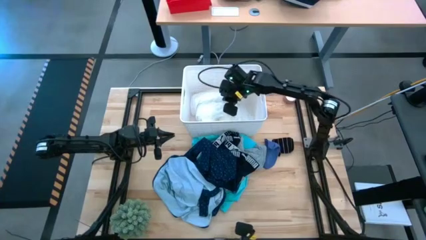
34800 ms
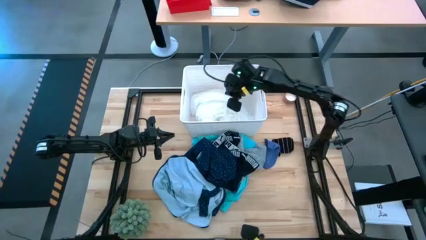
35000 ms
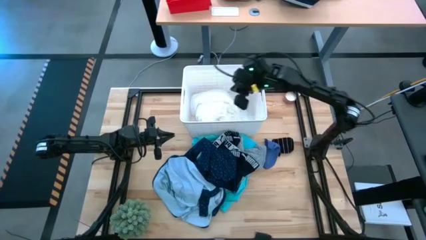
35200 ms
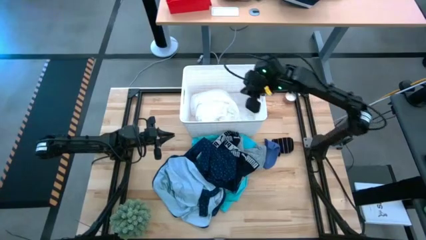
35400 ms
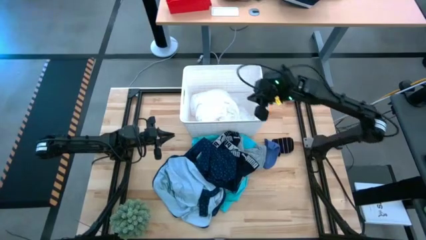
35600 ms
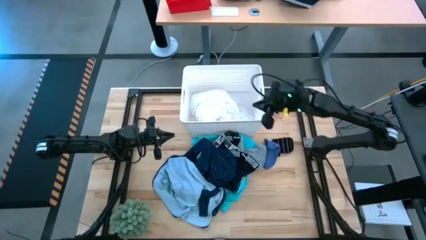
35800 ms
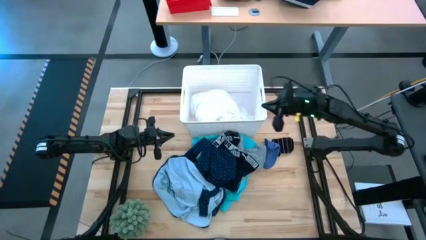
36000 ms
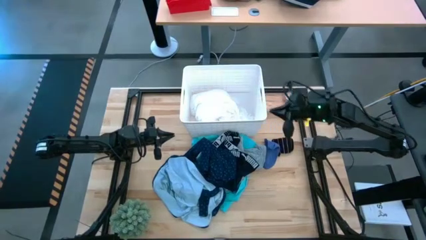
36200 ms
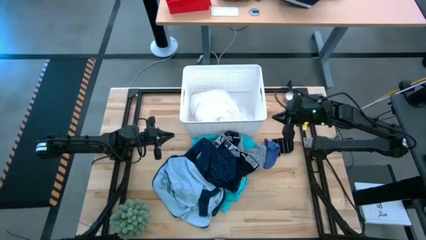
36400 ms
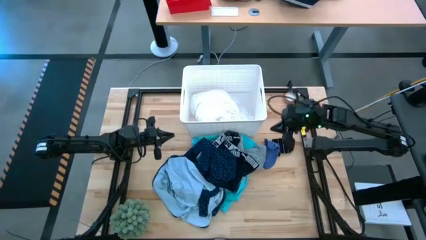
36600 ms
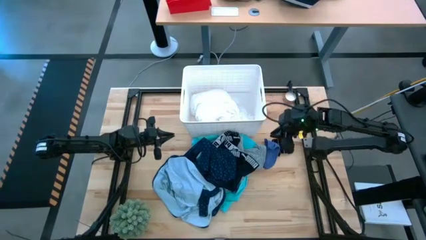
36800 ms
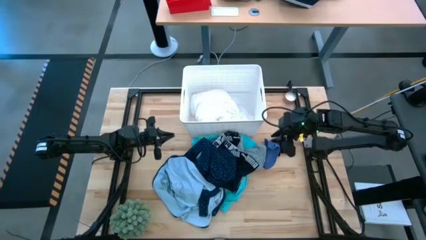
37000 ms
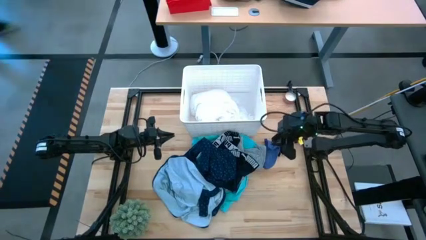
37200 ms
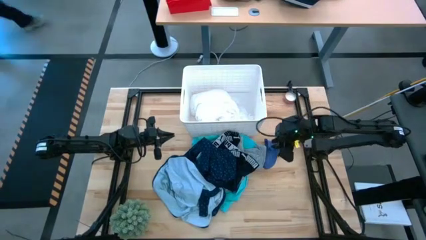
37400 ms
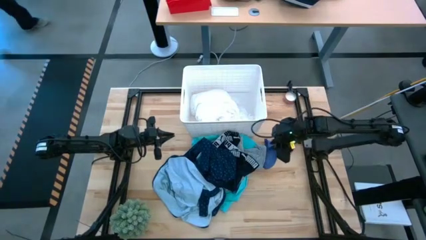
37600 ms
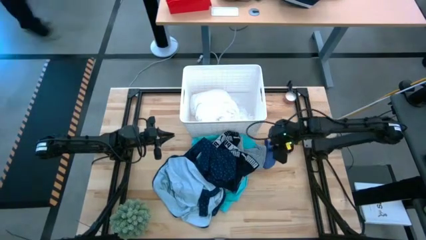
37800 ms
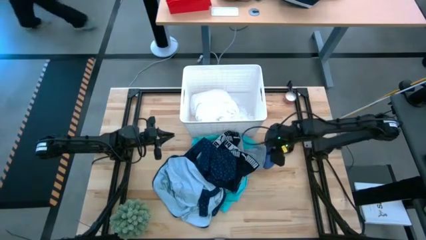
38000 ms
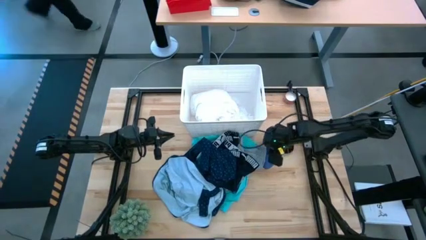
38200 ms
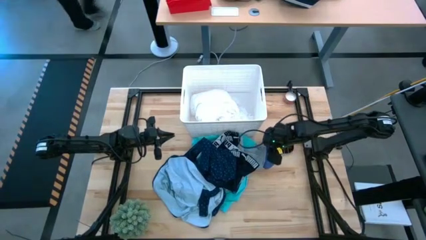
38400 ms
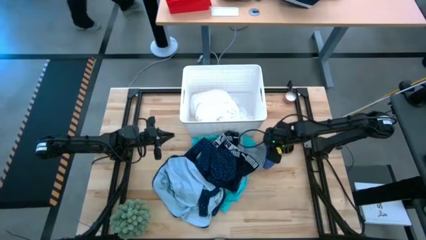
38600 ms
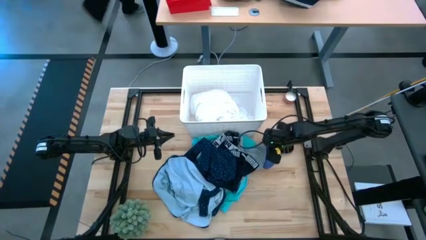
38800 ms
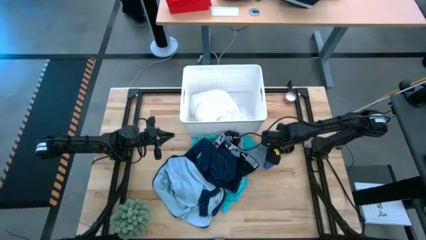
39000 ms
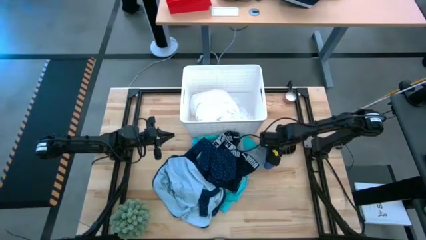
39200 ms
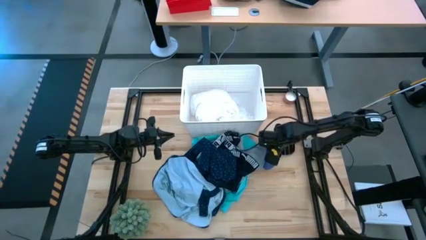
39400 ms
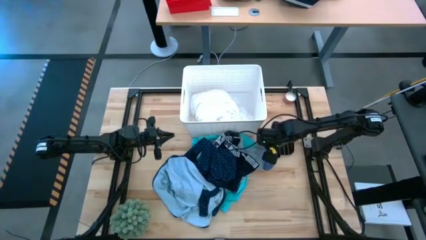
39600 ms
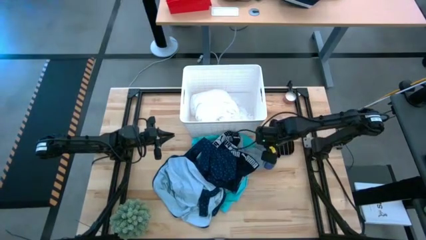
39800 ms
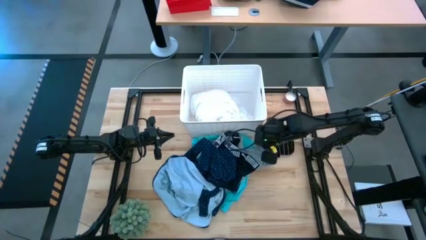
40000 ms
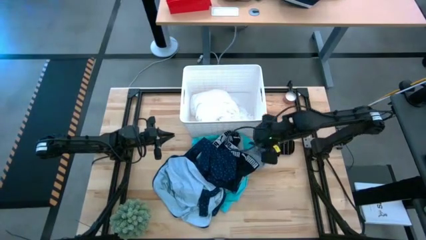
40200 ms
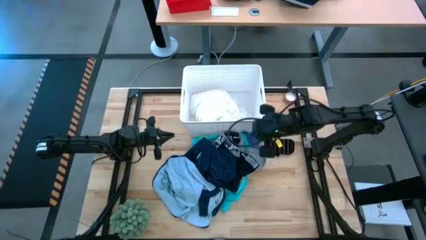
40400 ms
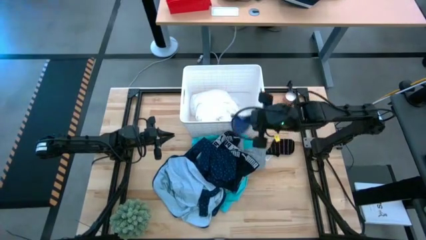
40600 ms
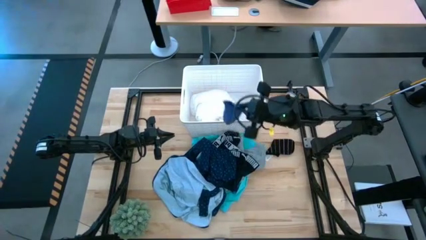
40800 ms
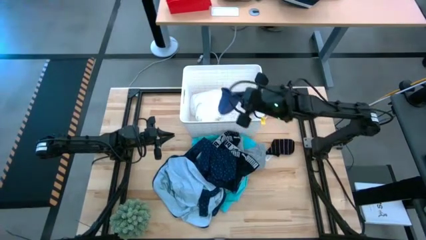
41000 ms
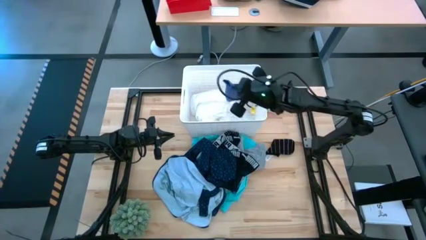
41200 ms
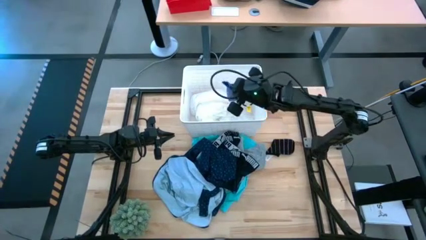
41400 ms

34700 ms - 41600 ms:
Task: Sort clothes
Put the blue socks into the white bin

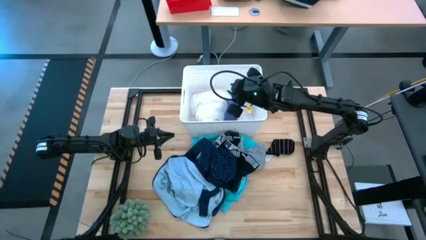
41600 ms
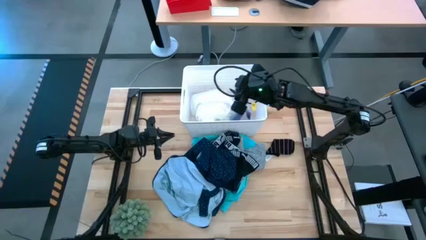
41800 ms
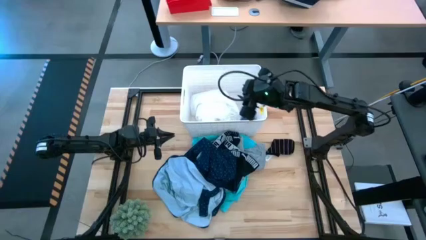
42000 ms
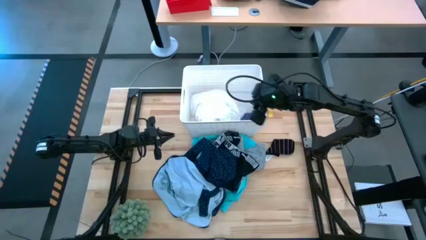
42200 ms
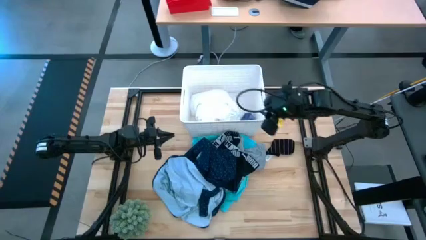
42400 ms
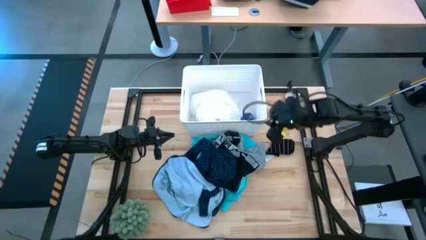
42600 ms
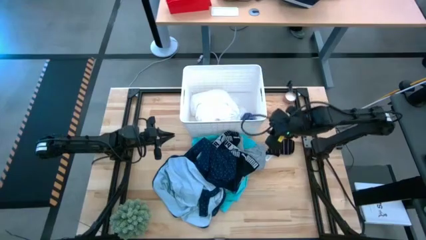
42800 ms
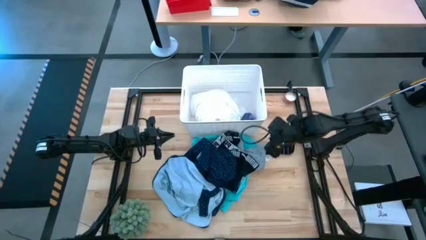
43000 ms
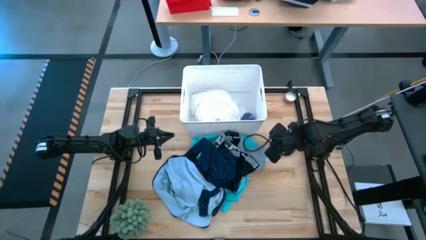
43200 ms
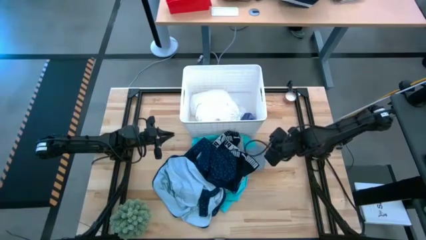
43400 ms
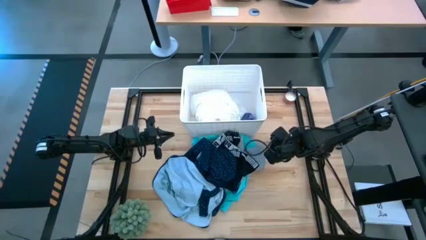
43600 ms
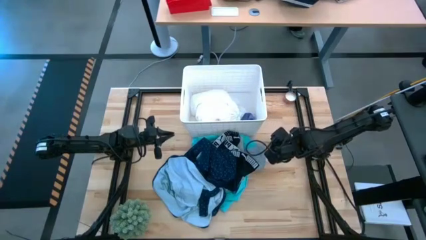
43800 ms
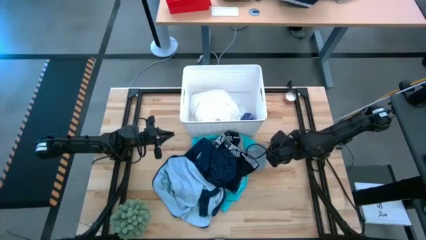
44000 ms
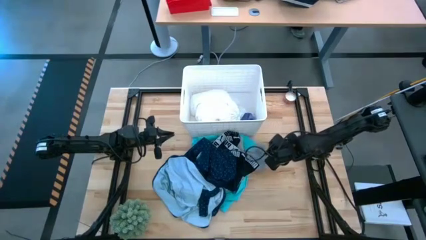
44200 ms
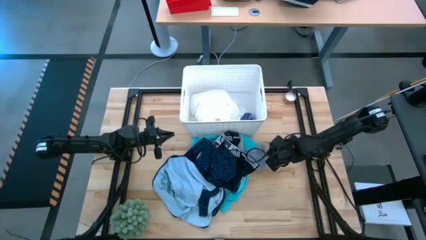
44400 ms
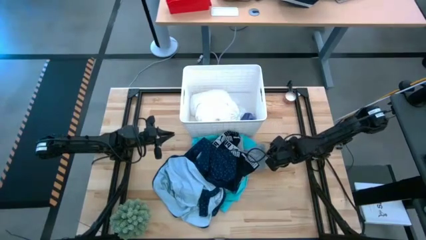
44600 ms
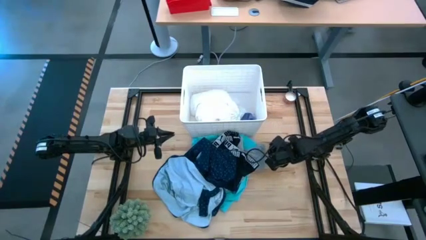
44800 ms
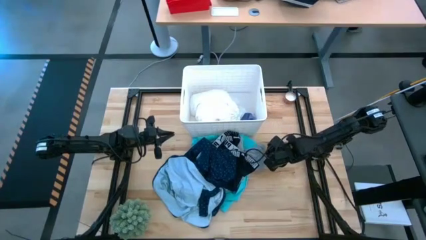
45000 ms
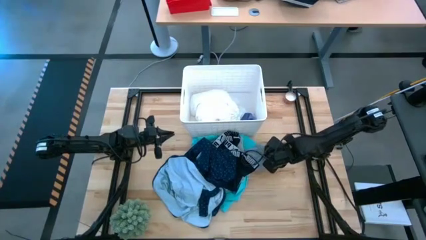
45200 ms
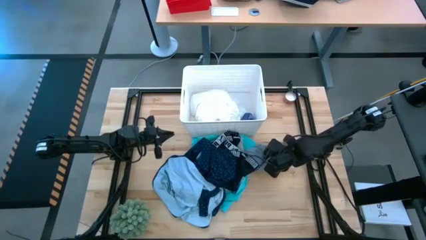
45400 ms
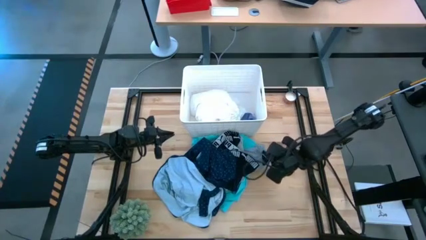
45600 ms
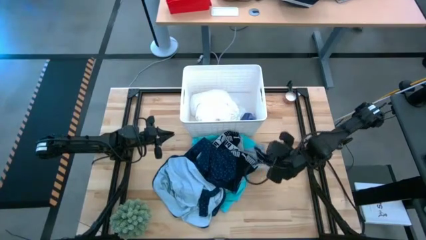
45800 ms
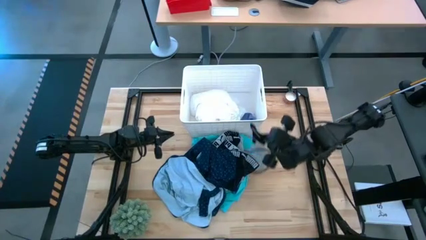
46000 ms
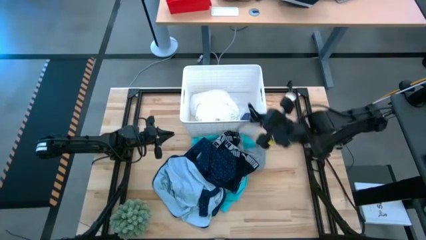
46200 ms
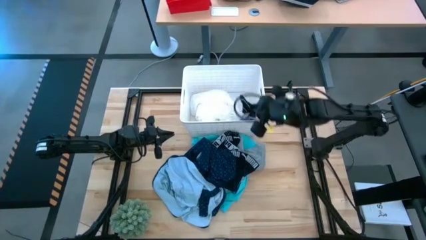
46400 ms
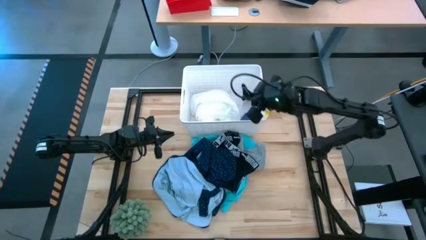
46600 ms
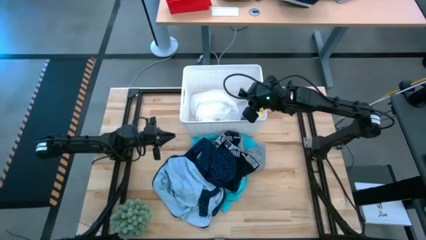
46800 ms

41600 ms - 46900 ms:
Put the black socks into the white bin
